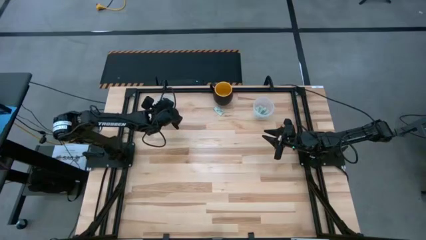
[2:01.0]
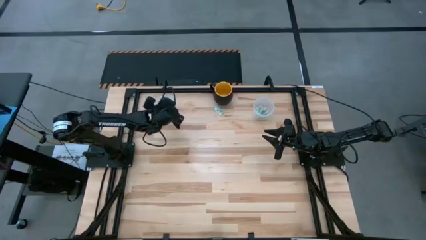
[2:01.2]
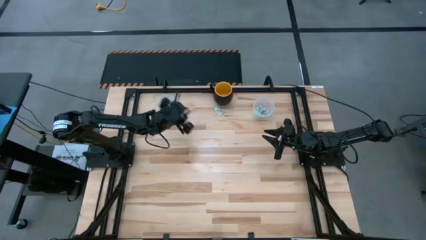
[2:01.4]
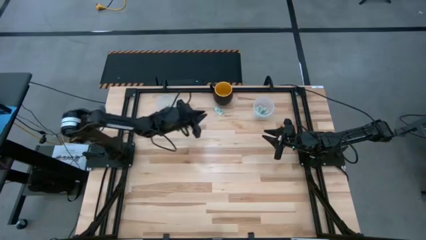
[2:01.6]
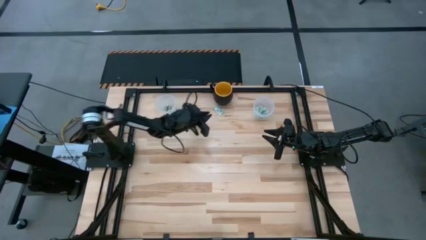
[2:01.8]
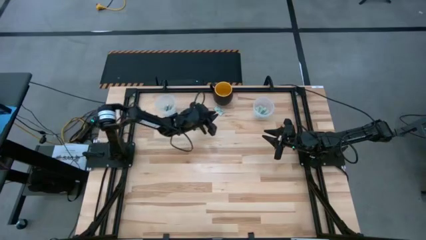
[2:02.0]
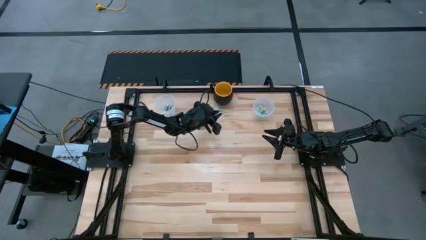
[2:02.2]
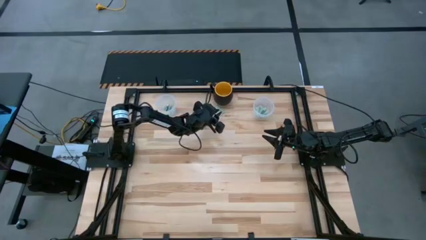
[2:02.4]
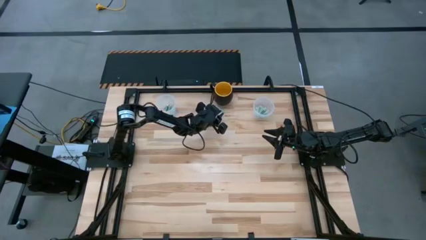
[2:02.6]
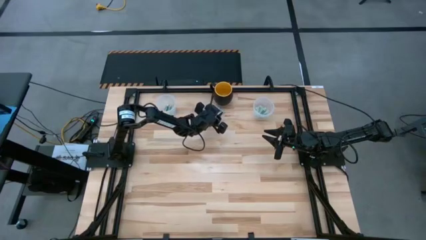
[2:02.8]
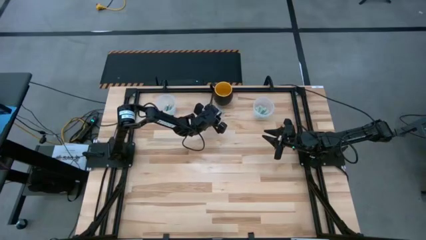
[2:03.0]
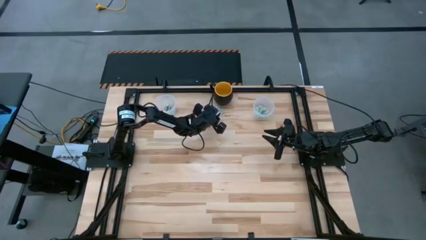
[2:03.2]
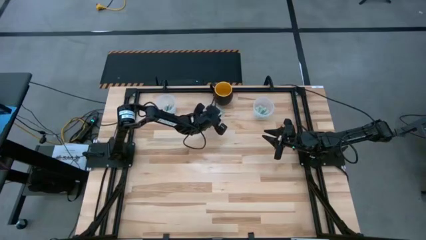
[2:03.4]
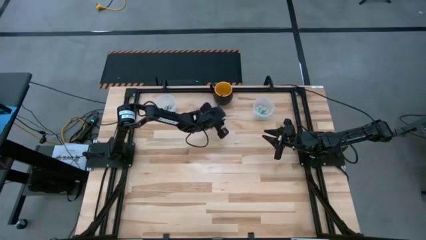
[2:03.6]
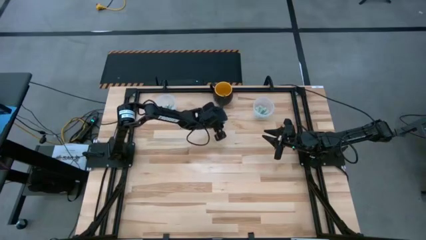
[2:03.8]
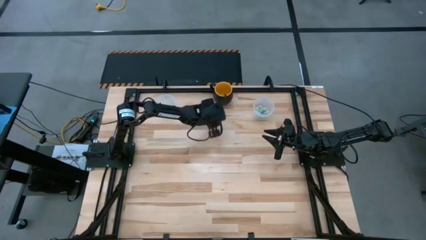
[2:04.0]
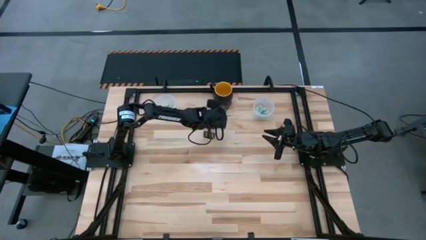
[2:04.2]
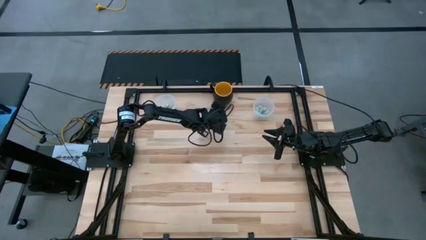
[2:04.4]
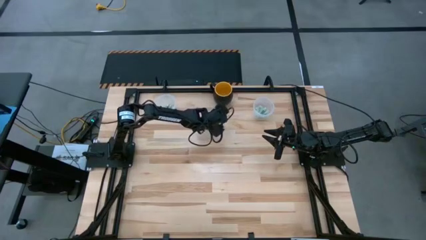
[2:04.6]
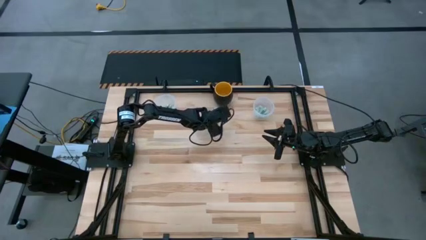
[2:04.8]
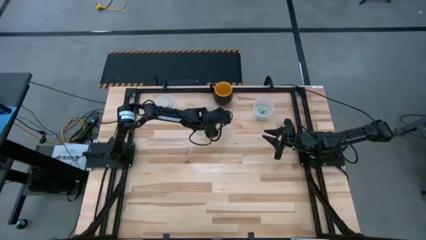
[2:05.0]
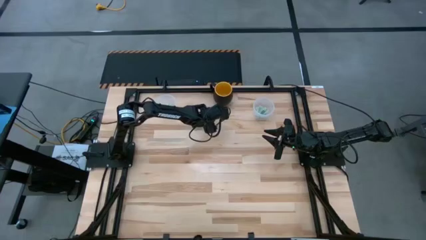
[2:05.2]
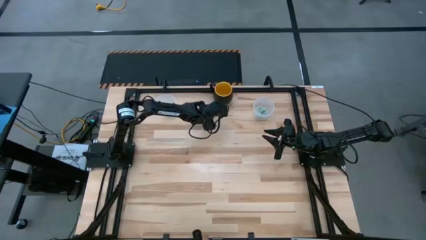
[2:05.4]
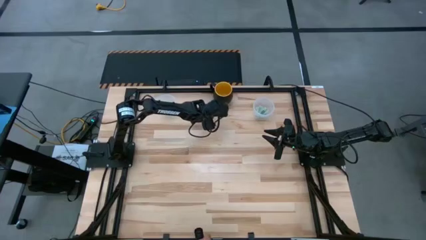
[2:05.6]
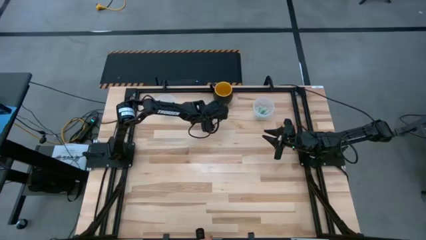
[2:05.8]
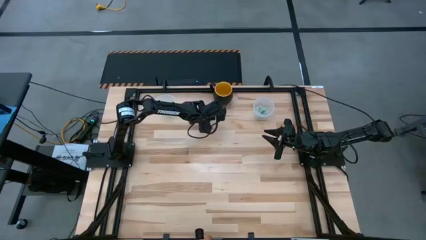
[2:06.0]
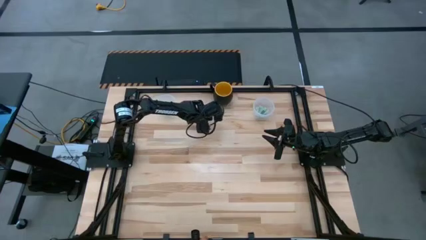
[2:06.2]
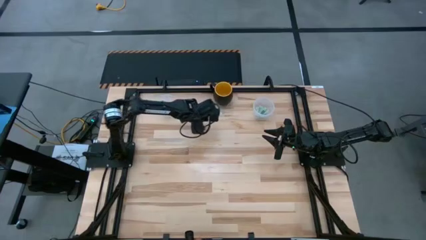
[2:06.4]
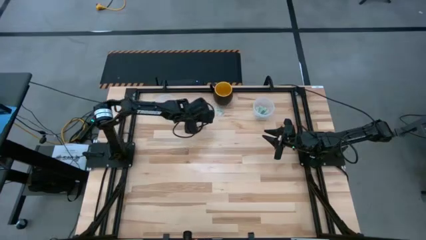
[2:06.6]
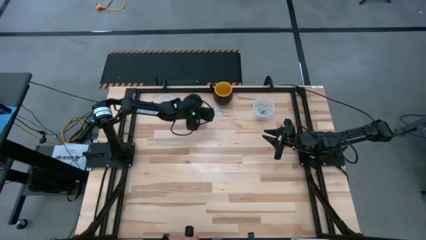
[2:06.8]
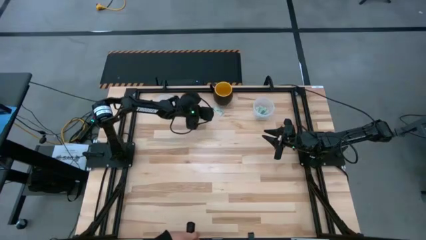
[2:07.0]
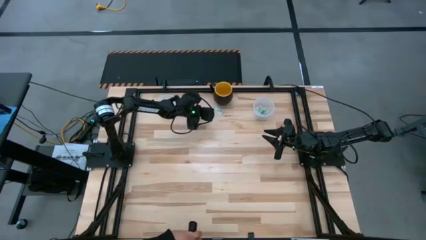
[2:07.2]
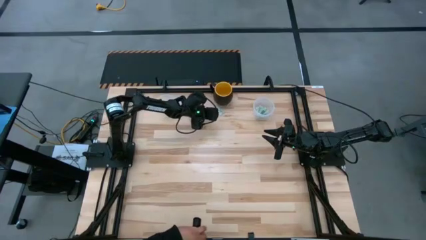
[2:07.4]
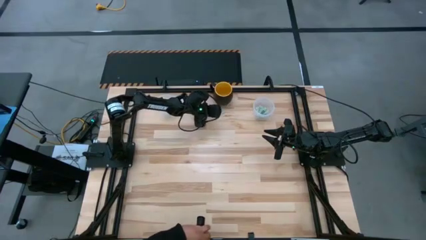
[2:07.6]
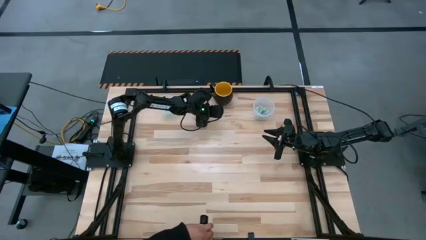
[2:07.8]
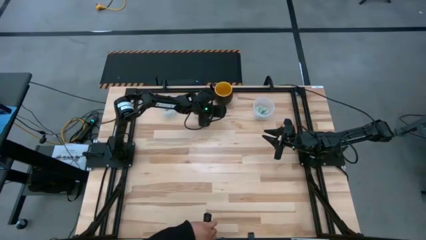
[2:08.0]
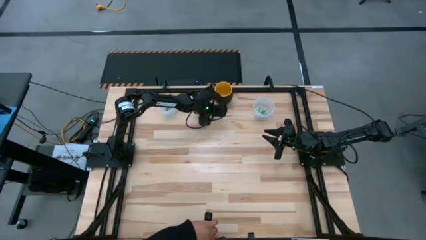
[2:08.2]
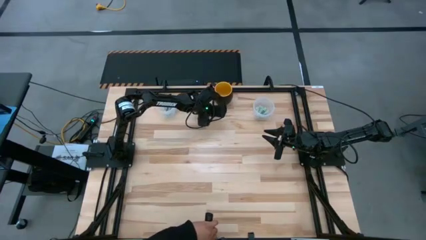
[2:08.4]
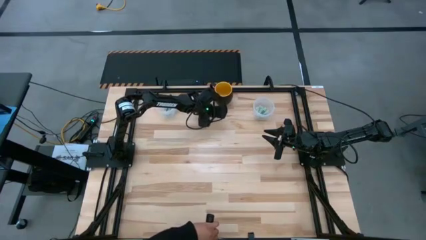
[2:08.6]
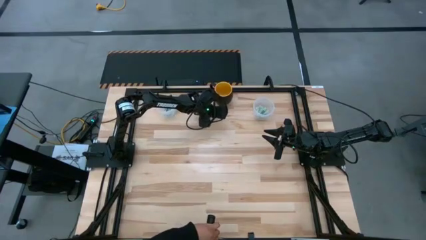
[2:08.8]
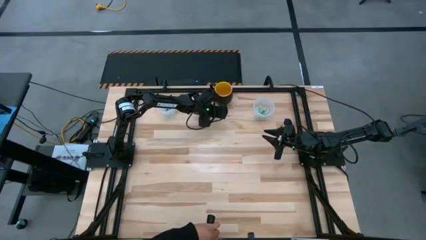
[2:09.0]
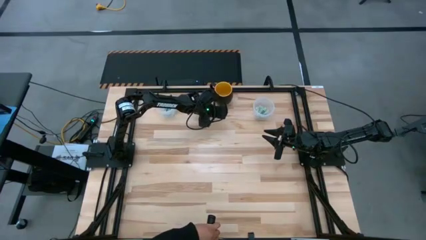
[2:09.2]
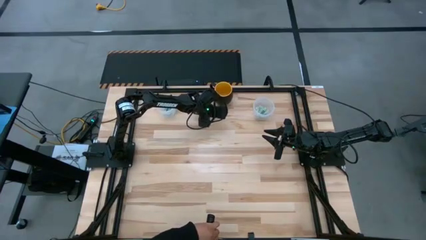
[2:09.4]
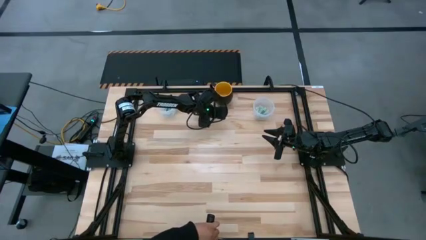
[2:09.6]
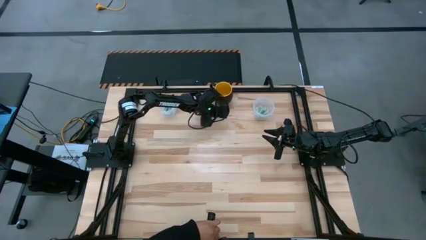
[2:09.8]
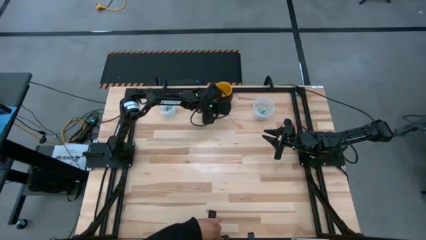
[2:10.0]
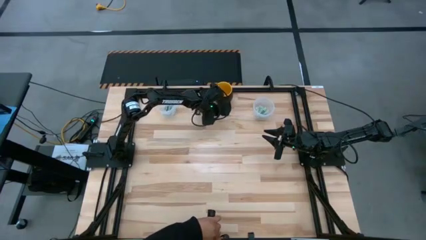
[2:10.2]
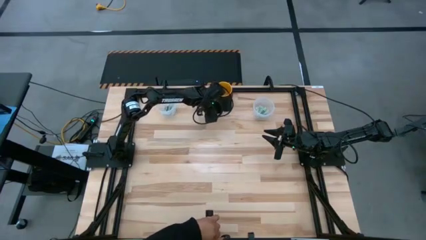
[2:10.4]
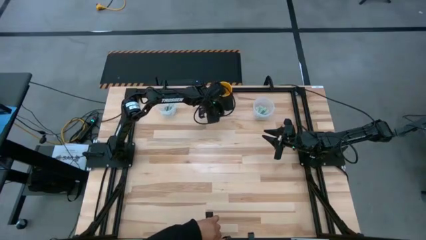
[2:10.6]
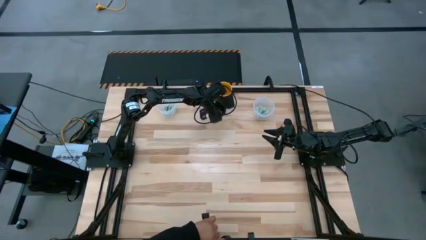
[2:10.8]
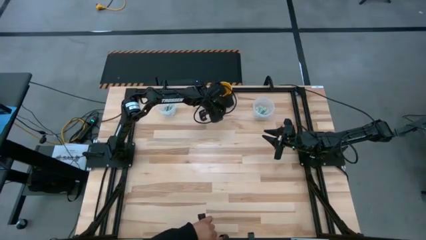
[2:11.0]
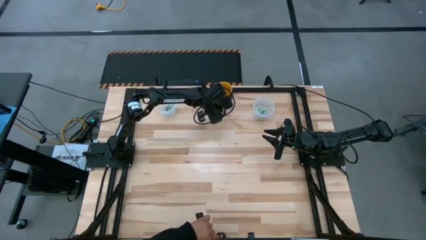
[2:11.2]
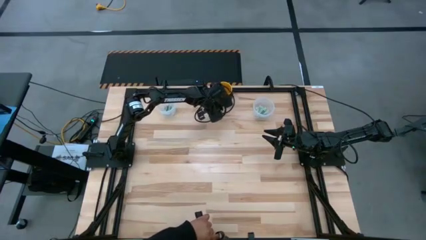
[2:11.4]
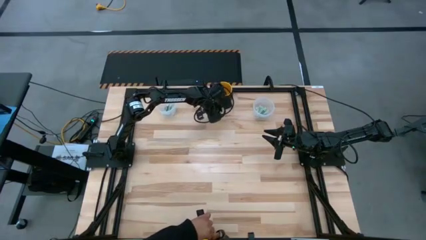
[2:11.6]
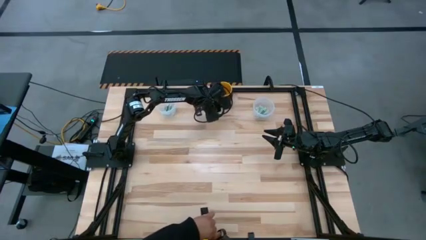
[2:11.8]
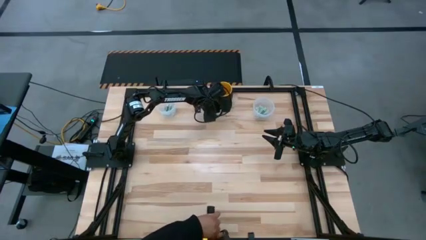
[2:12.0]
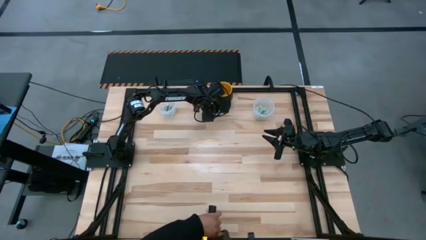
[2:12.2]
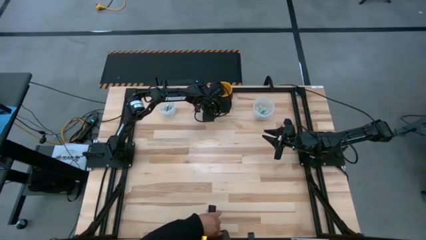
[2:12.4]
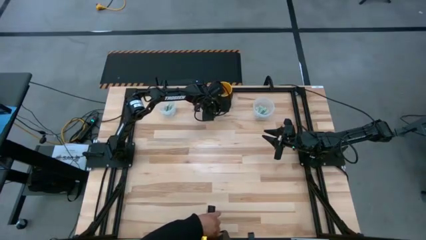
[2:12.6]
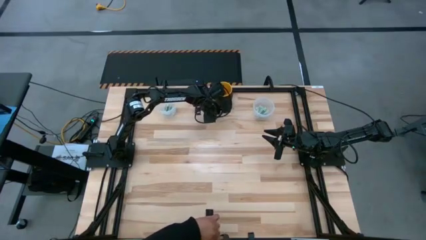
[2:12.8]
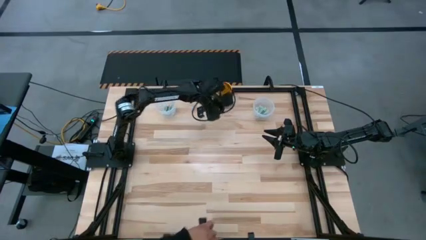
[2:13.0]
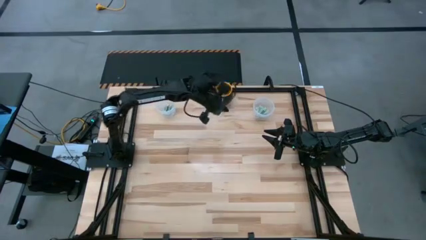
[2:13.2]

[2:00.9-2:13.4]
Task: Pick and place Stevia / Truvia into bins
Put the stevia packet into the left transparent container
